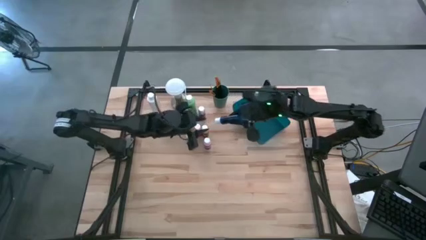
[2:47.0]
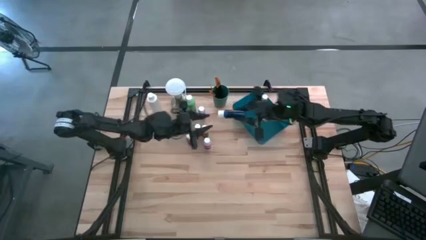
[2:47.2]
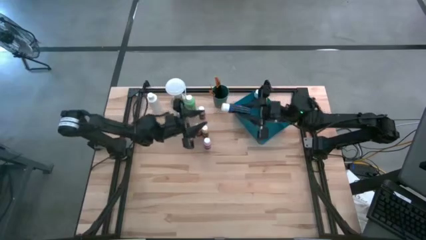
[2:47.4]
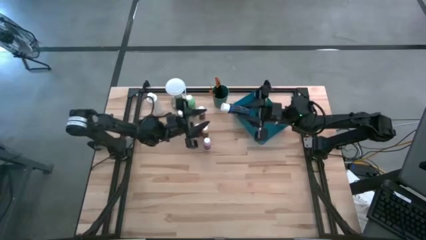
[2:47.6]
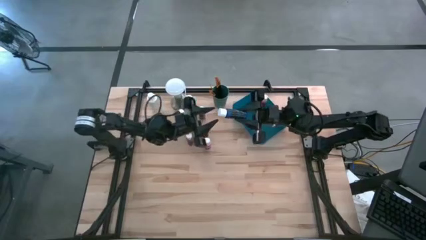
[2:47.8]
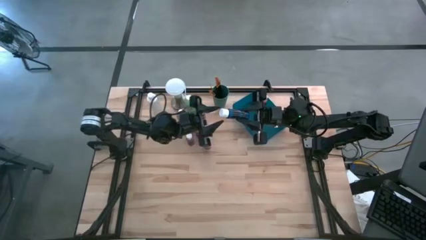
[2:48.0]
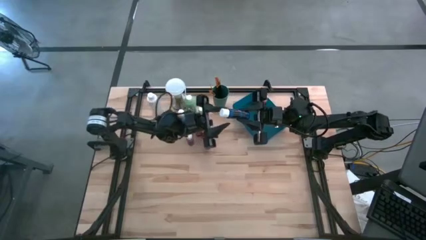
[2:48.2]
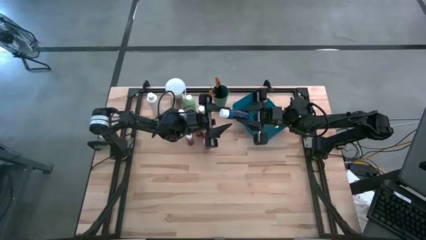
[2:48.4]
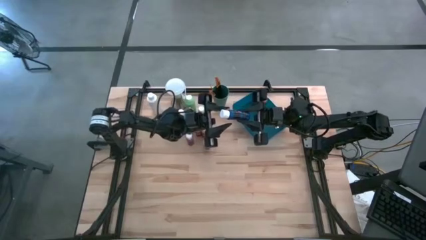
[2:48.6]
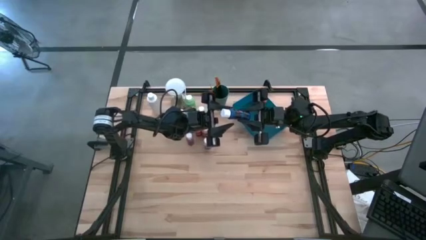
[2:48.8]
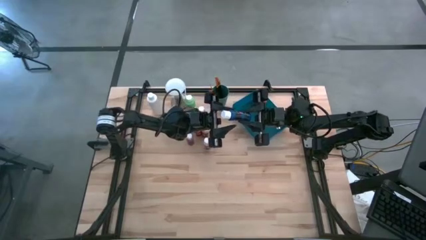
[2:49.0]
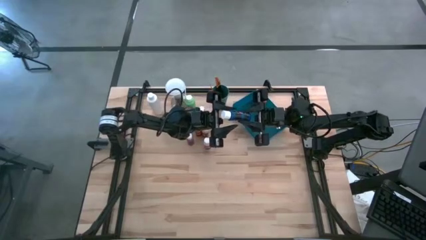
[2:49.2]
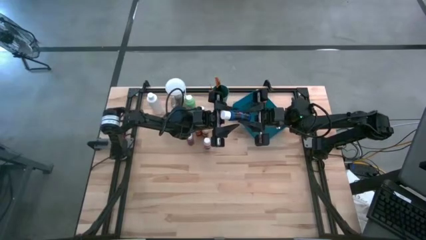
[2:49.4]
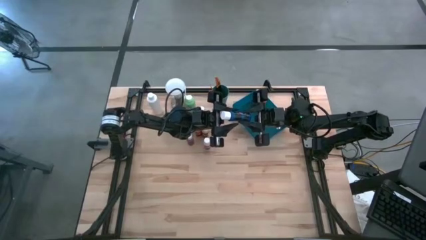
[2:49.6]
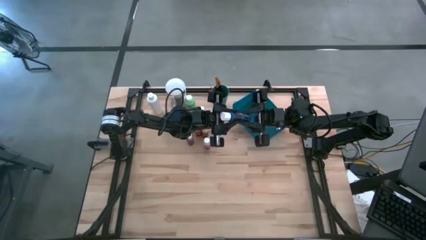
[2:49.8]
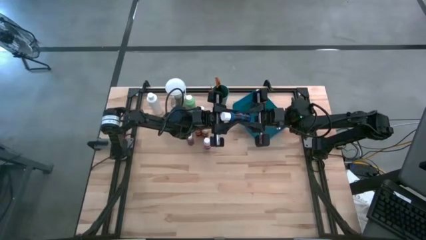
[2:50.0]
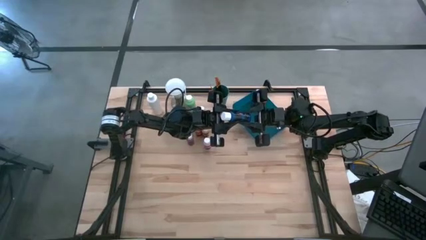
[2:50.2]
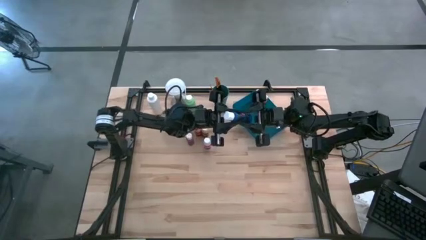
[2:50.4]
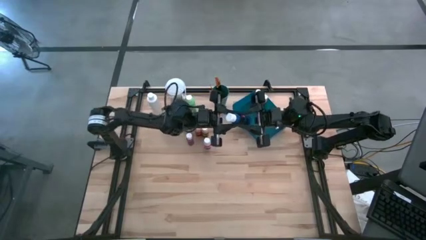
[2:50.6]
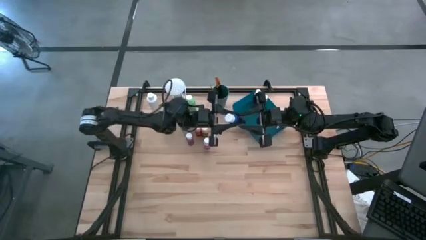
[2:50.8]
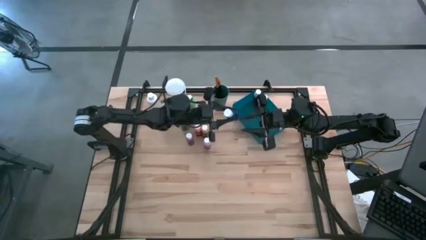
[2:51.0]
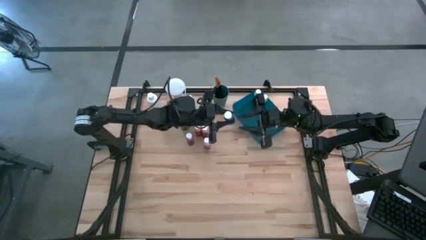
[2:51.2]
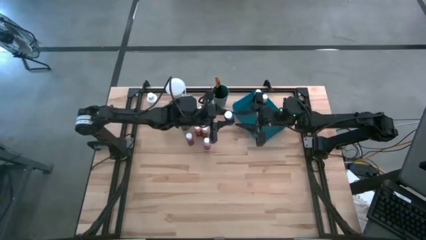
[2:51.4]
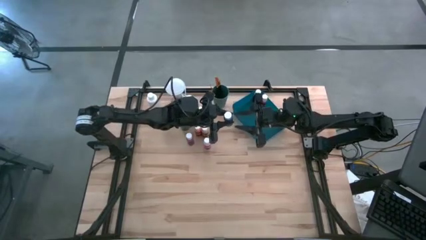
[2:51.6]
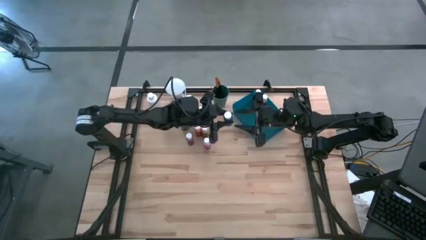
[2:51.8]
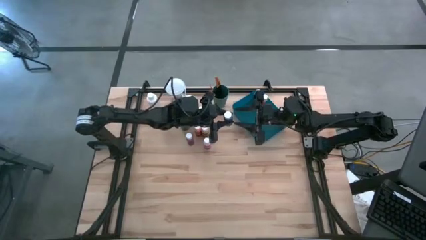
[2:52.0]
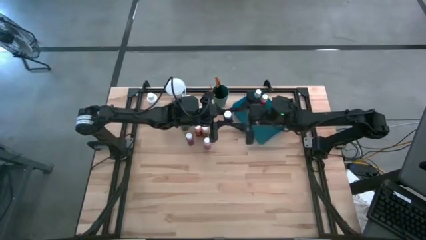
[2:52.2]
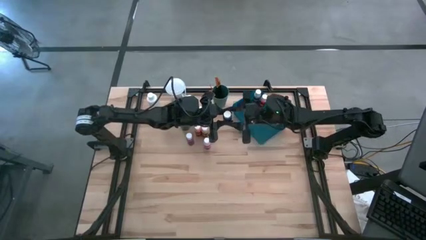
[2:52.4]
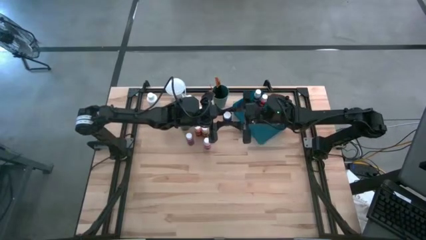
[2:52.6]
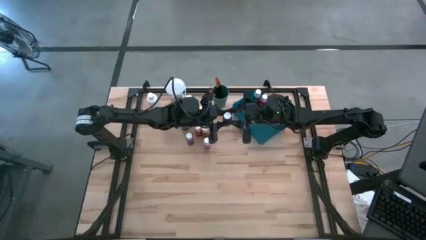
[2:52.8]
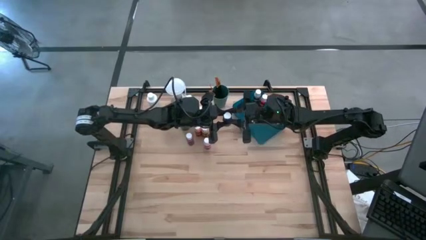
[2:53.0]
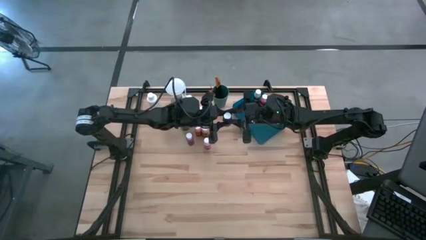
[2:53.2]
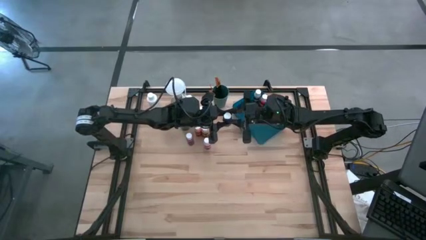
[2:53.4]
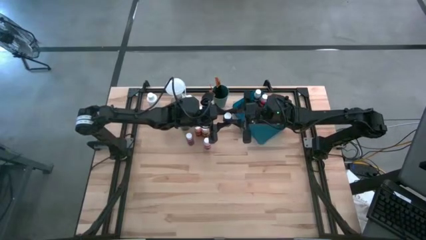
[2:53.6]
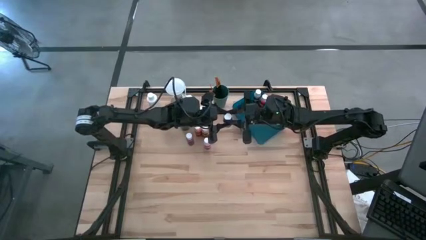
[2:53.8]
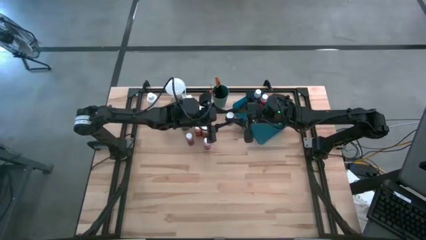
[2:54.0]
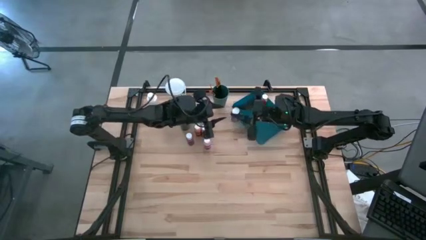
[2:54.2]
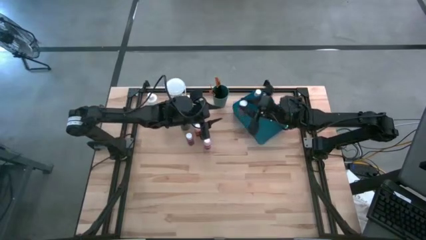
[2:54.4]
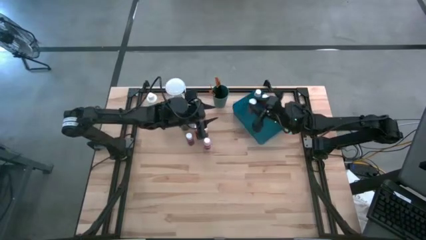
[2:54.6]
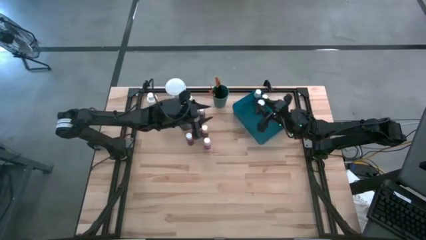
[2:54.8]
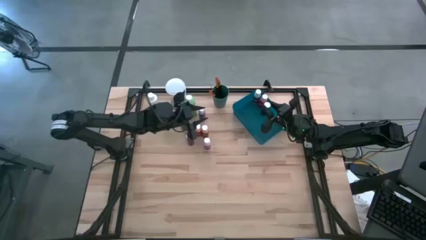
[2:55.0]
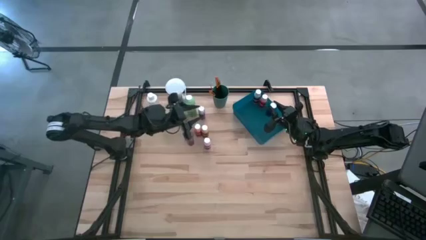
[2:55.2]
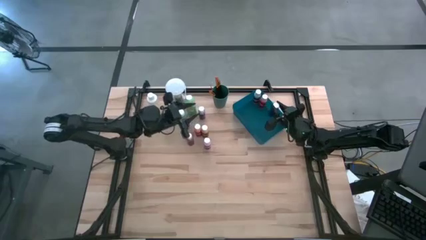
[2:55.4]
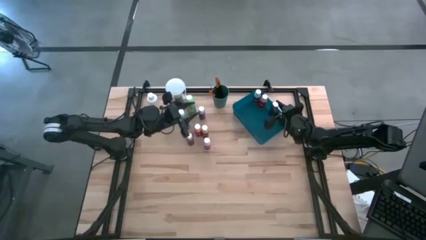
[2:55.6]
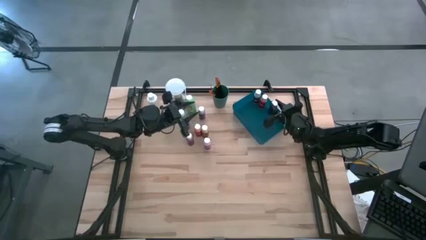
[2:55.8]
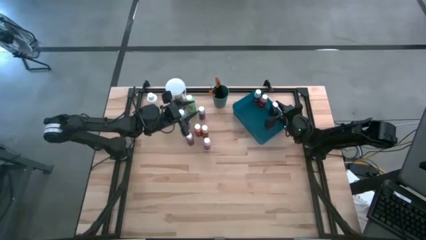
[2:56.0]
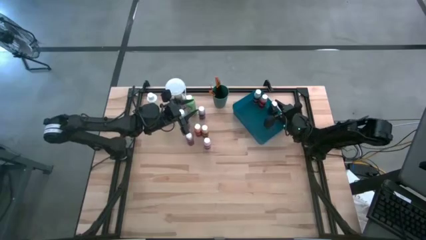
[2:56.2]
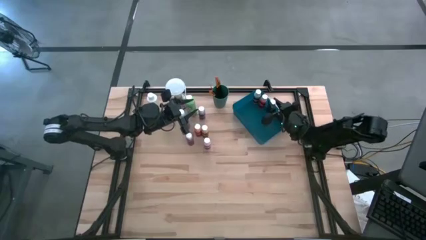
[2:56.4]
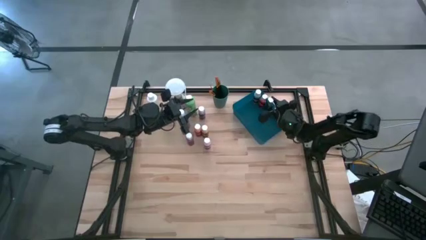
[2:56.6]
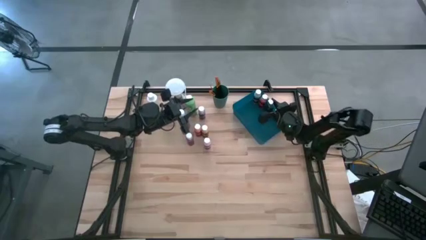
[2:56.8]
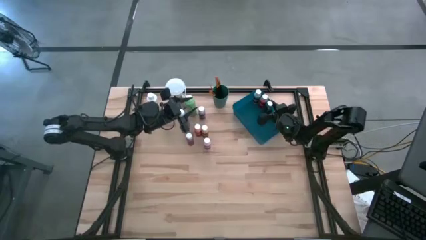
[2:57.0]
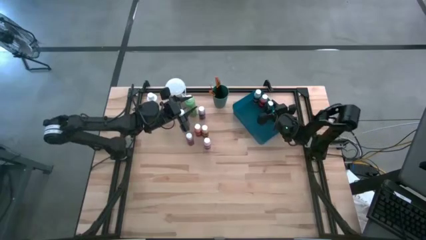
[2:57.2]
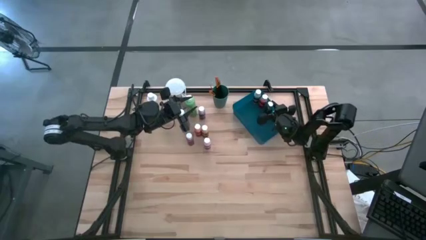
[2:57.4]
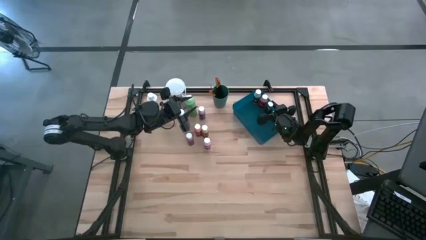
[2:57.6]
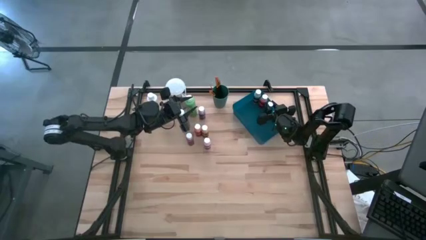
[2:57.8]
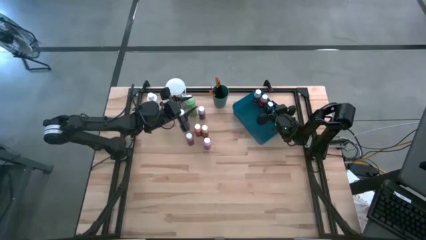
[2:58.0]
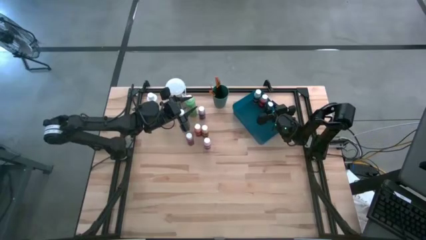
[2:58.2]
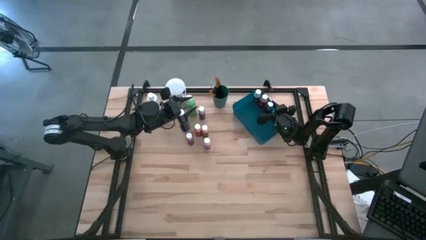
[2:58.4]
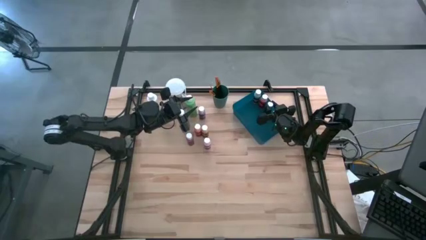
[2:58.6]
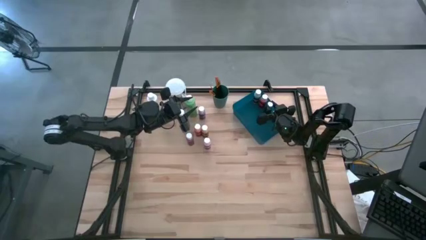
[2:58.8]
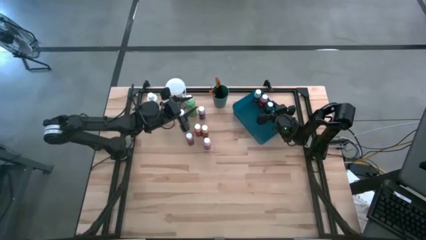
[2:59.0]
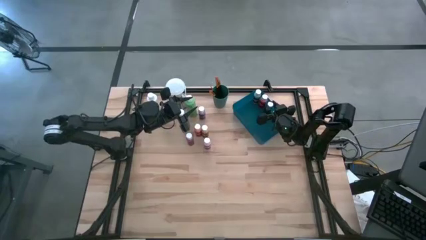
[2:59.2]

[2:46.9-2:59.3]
Task: Pick & Place Paint Supplies
Put the small blue paint bottle into the blue bin
